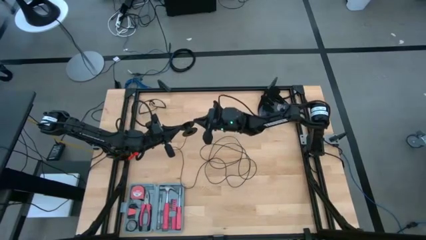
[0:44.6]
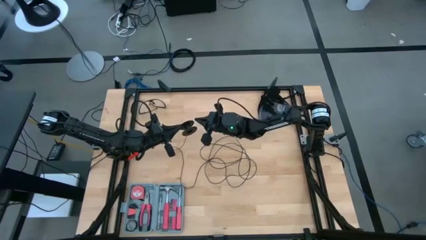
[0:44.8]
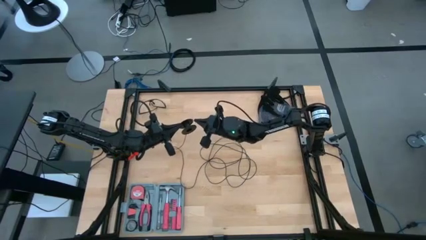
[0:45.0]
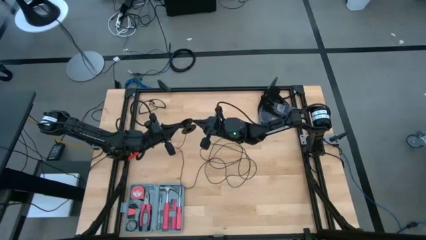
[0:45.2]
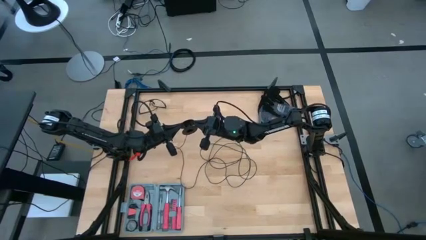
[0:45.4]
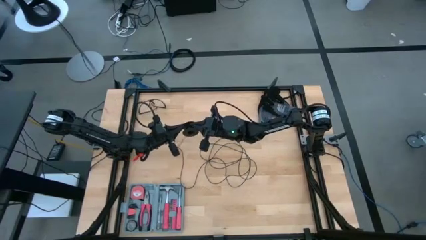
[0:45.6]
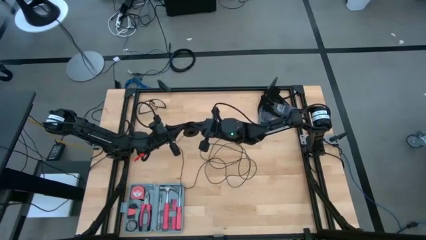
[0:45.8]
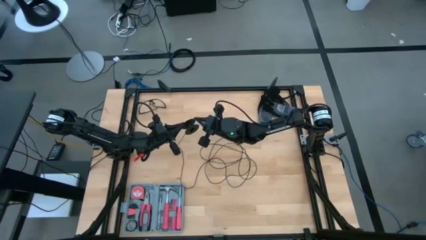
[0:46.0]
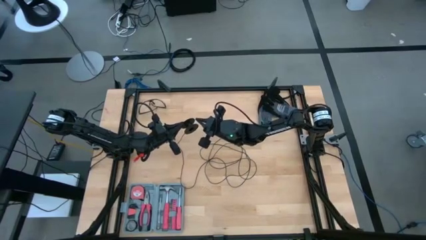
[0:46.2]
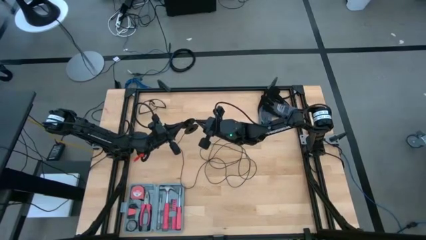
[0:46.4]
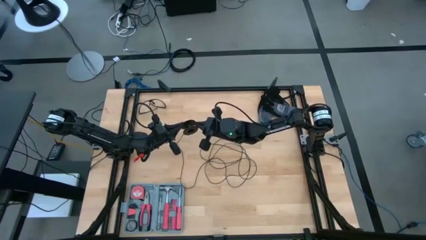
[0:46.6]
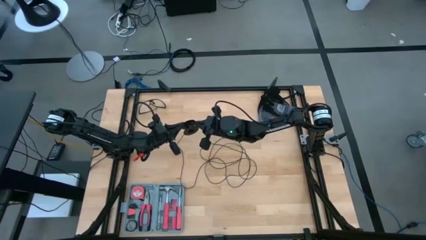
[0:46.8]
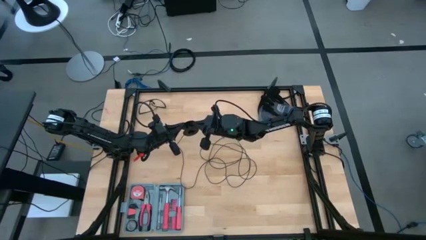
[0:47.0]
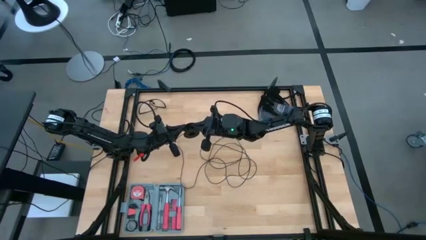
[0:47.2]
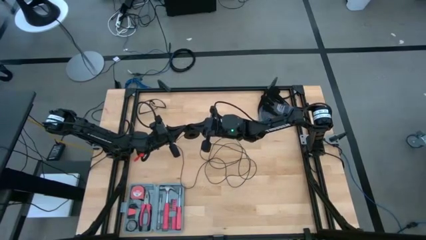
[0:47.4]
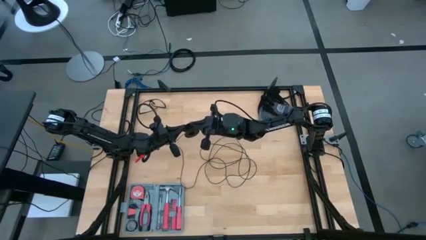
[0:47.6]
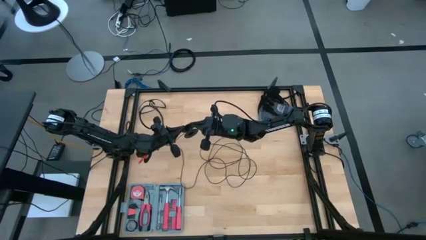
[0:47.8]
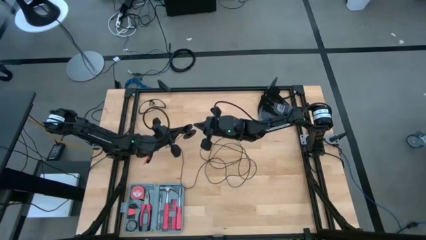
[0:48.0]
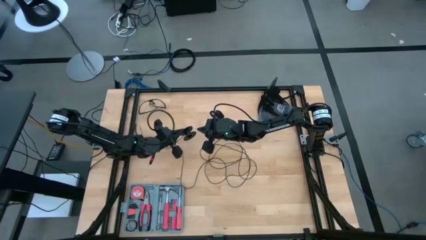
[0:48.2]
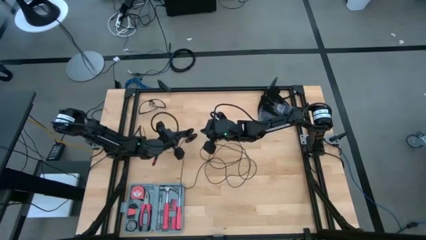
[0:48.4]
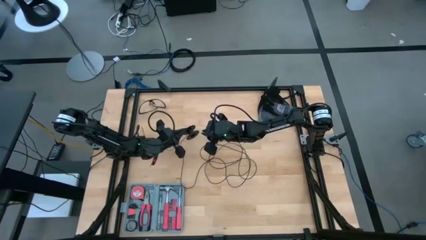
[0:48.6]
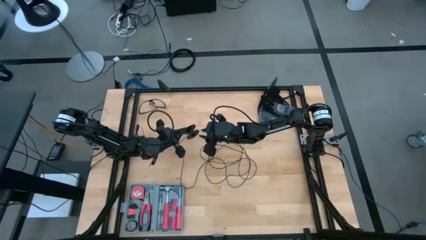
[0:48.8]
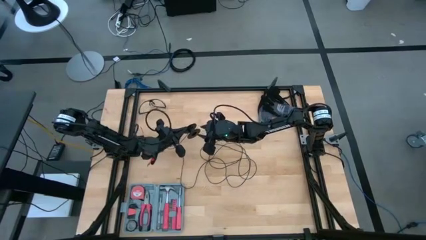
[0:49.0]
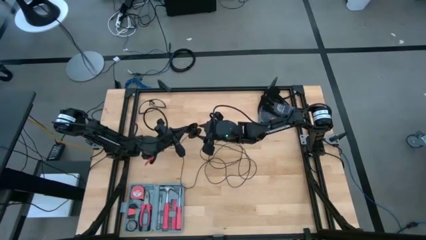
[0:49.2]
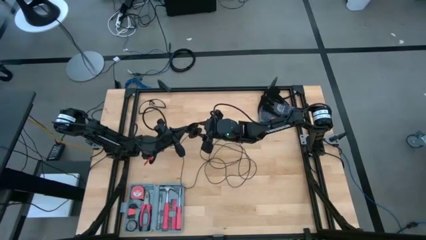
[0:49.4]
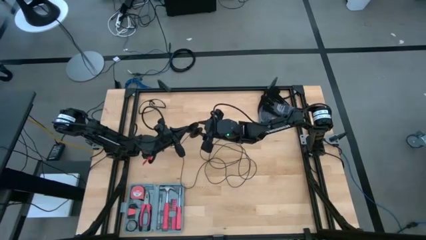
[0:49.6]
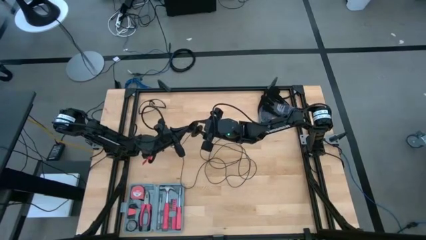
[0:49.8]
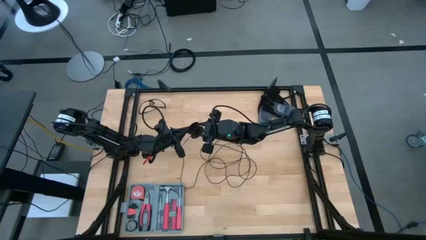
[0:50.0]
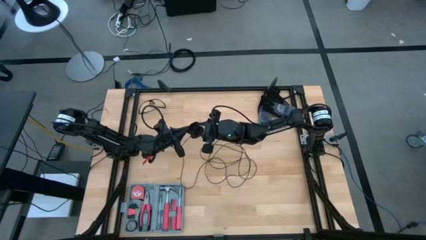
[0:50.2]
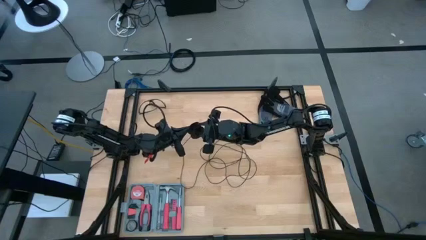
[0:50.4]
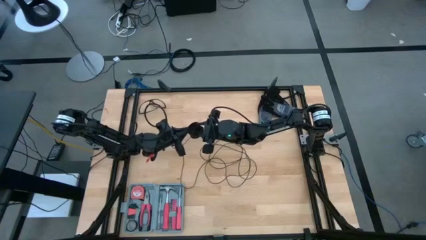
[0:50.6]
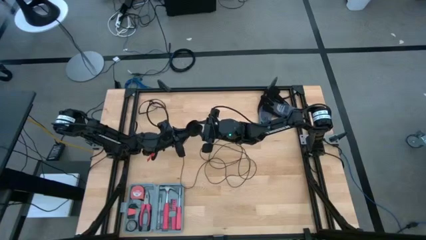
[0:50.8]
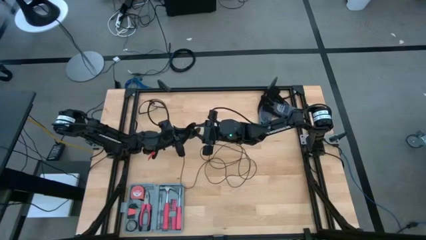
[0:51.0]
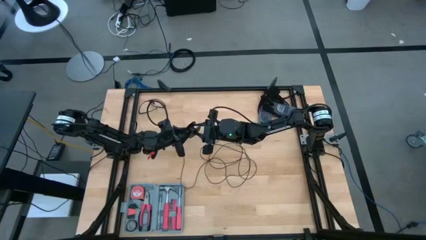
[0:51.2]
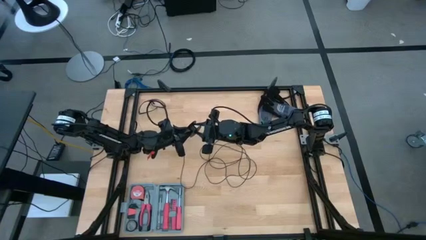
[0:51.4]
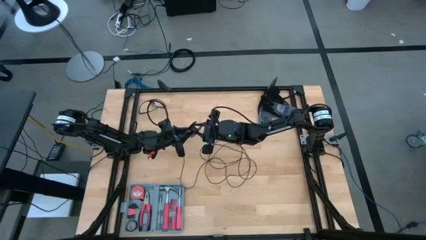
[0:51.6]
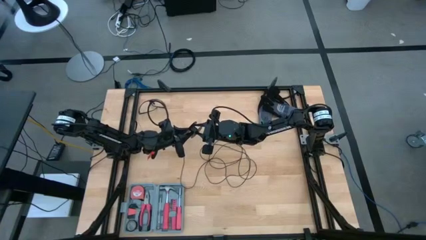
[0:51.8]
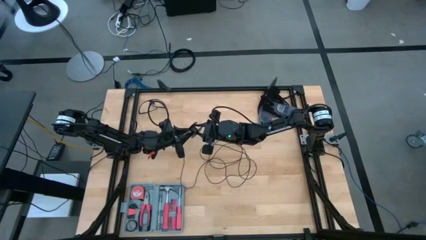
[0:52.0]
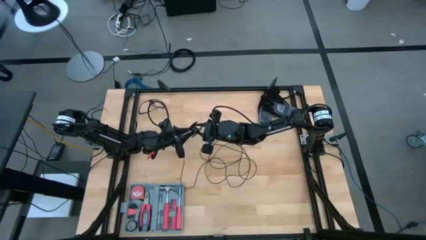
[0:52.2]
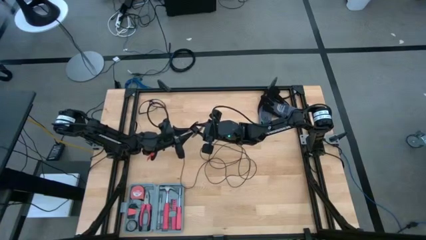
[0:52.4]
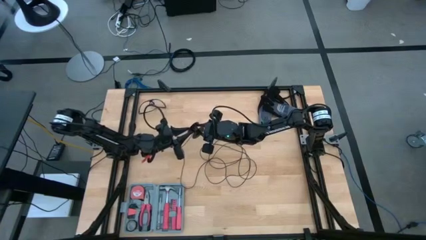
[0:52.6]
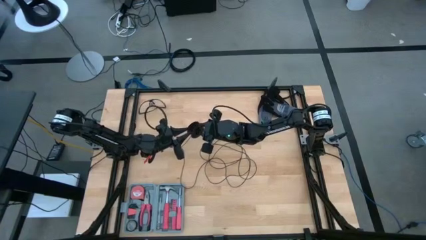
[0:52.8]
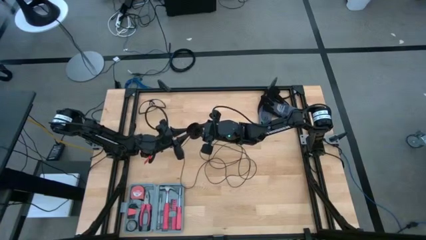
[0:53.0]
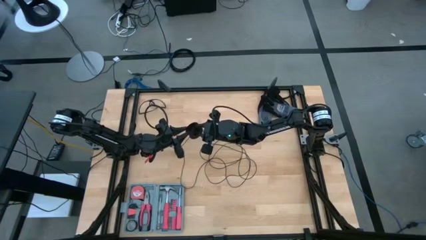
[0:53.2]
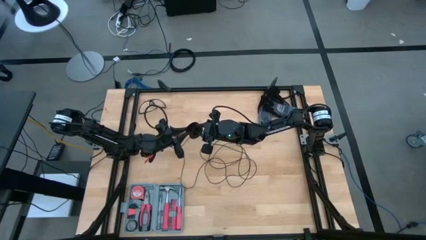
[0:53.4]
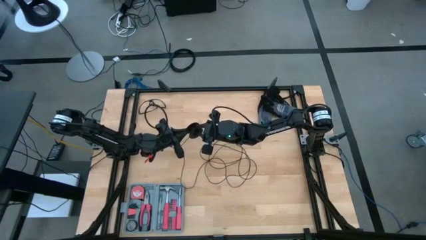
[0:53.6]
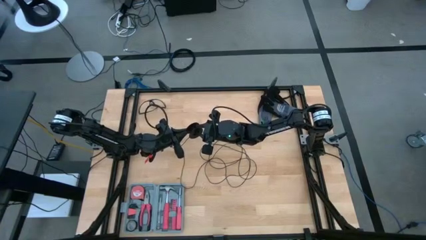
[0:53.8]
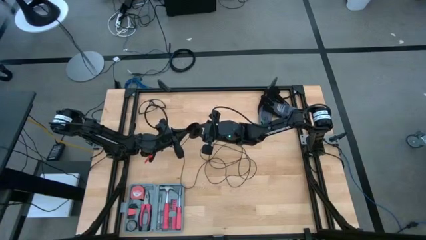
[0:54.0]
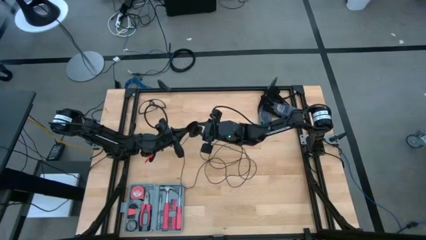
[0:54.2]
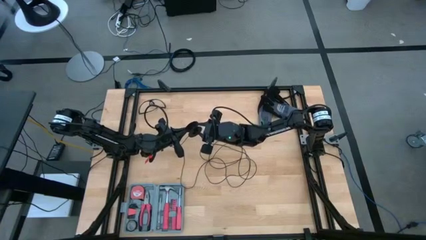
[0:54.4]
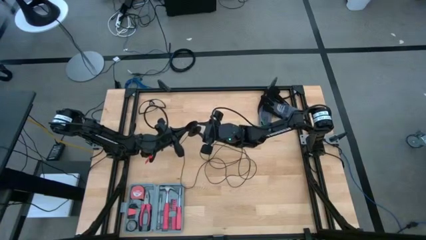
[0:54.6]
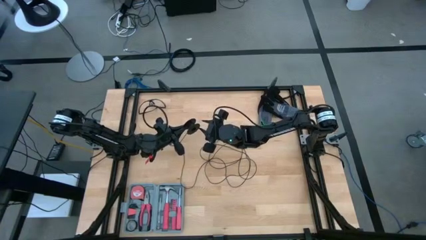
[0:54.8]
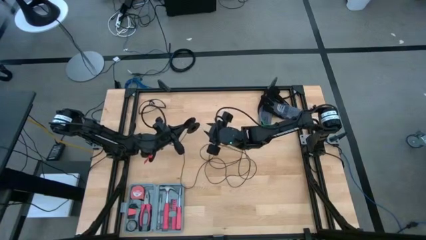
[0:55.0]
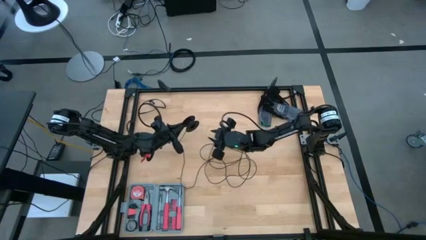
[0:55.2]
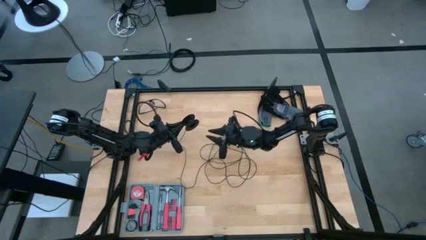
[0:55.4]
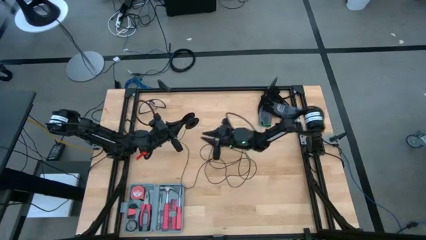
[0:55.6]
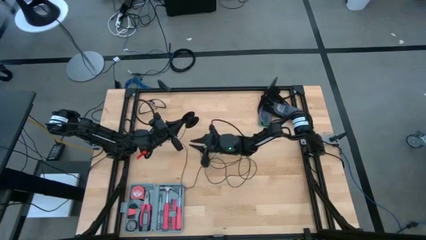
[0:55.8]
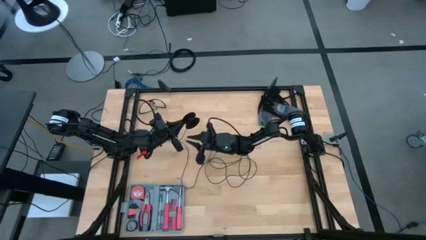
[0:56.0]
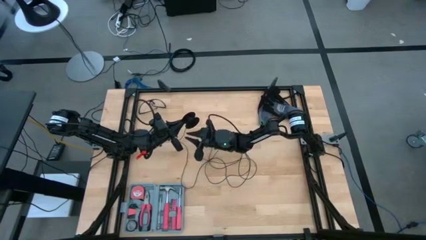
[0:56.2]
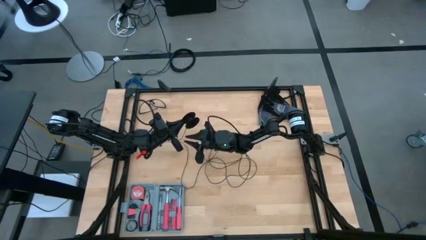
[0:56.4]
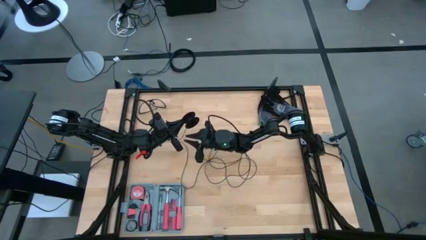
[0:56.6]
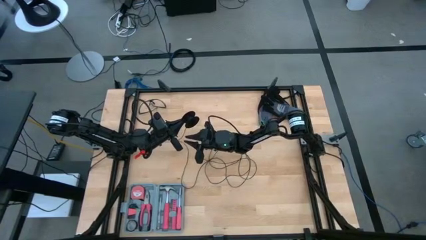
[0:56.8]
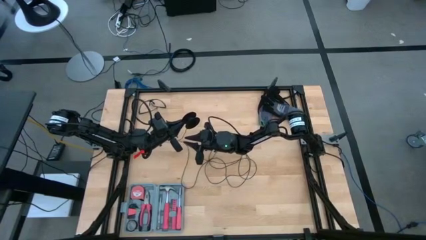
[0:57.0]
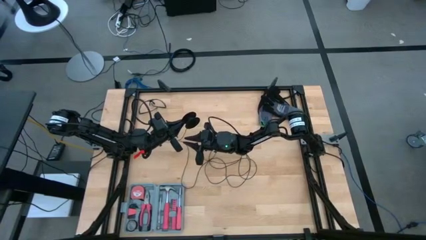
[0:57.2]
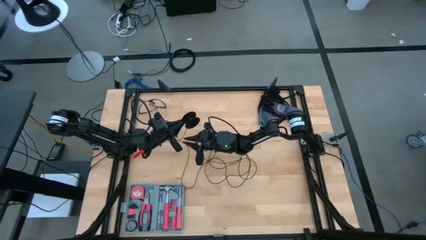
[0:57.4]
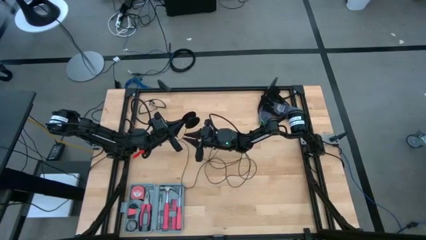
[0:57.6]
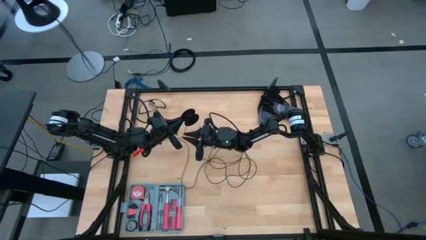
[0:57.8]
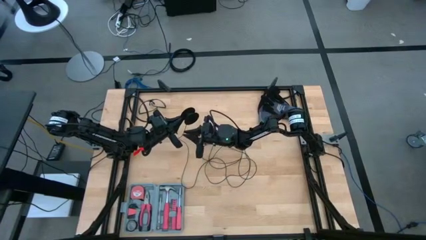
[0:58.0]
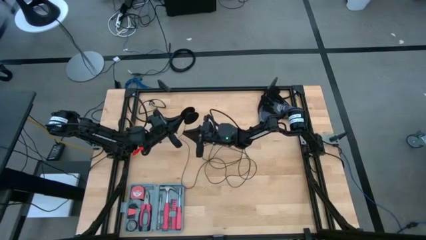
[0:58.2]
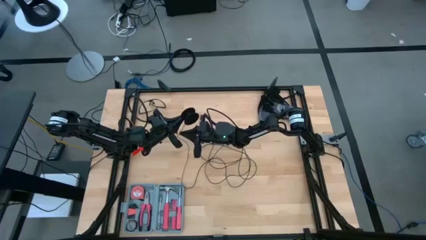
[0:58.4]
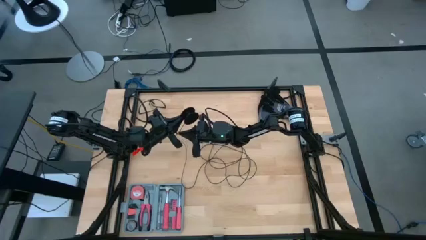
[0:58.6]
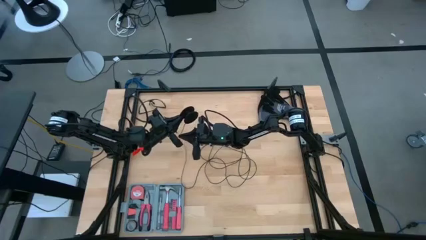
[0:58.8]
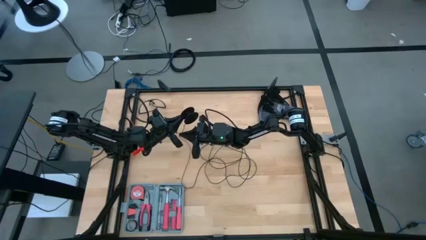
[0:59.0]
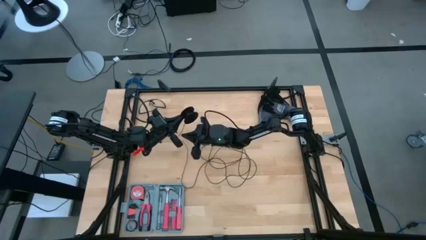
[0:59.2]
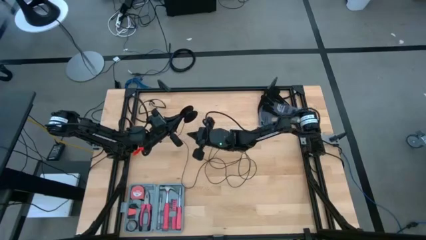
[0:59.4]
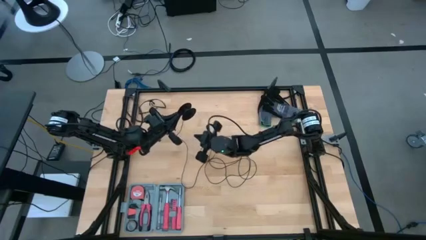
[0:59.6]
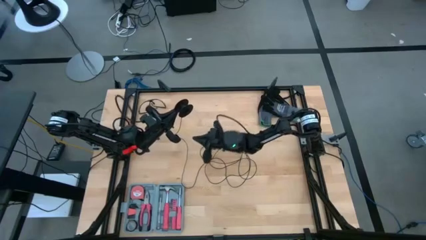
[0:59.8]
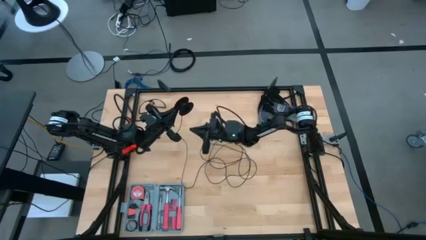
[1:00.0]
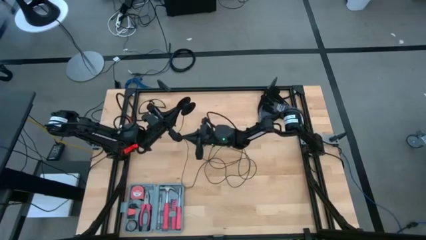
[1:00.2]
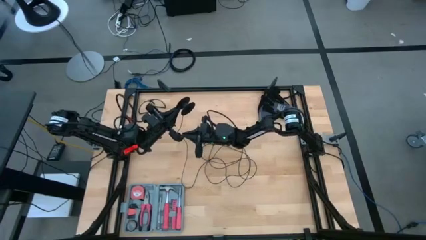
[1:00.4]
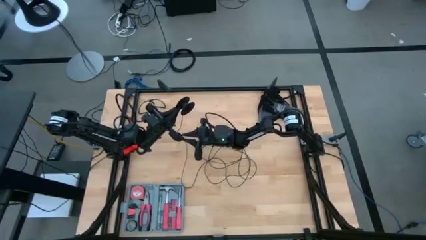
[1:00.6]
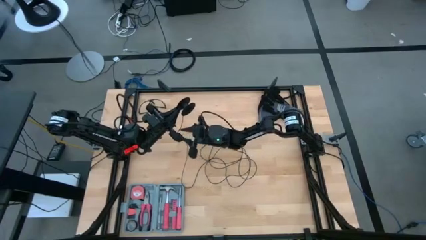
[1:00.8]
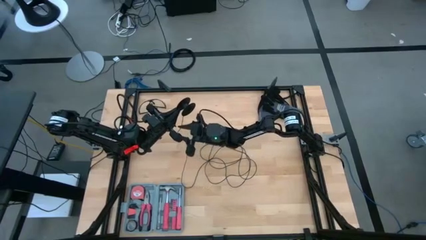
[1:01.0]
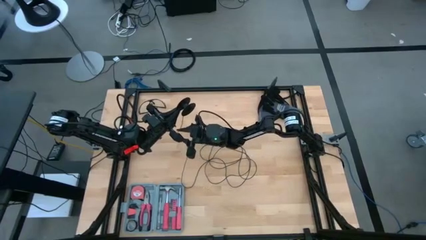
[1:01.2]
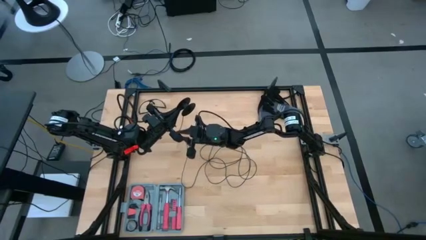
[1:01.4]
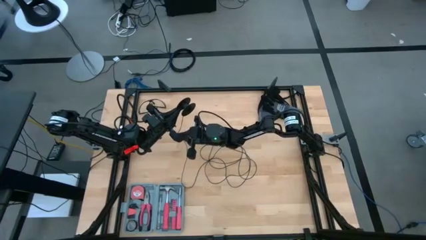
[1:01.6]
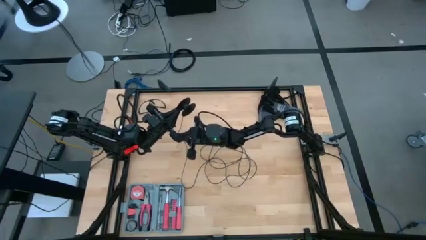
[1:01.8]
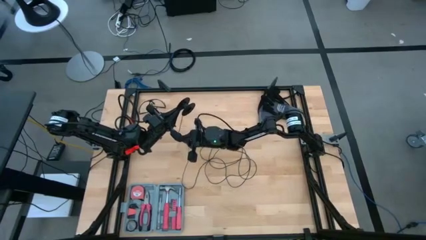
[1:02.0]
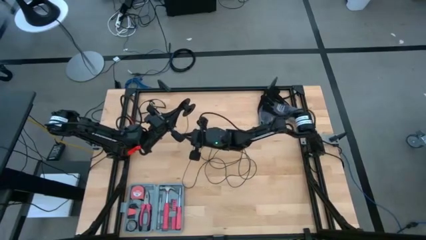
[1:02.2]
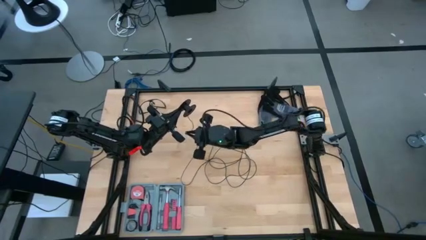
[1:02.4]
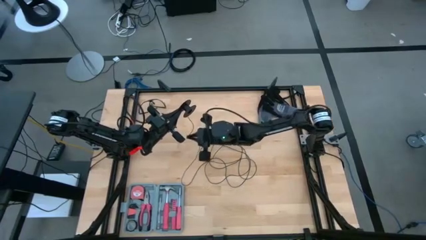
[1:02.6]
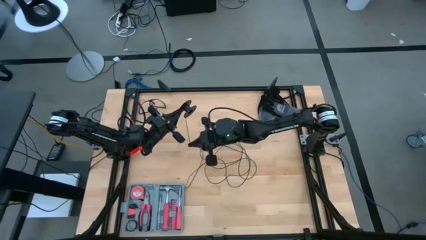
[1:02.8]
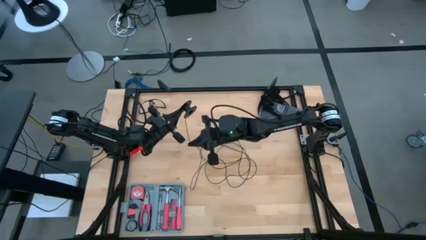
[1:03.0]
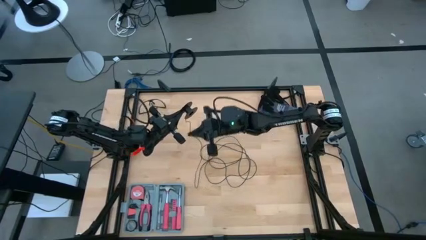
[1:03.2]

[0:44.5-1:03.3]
Task: Coil cords
Coil the black wire onto the black spool
